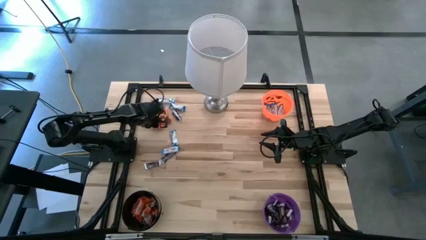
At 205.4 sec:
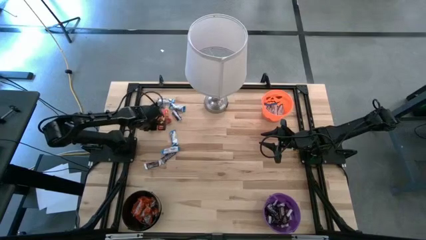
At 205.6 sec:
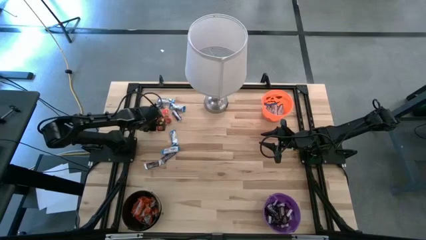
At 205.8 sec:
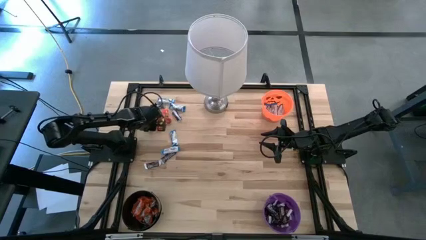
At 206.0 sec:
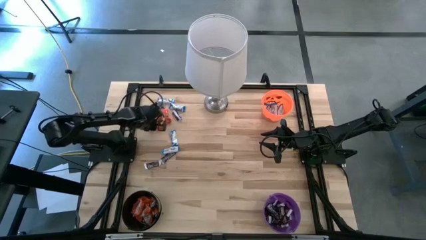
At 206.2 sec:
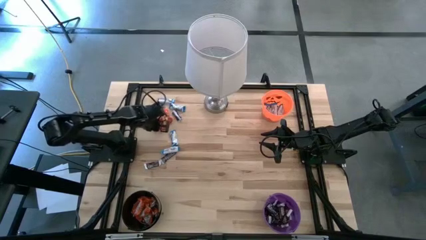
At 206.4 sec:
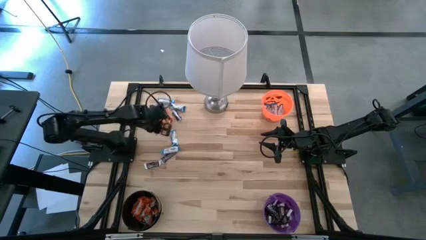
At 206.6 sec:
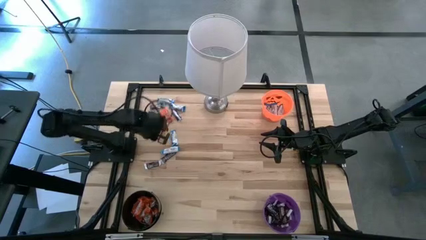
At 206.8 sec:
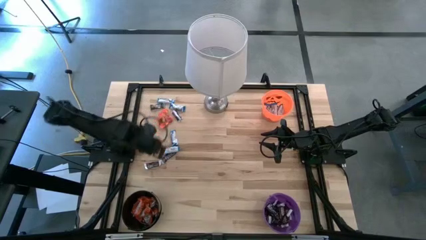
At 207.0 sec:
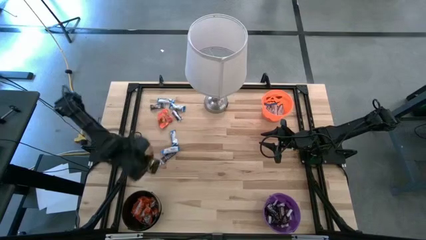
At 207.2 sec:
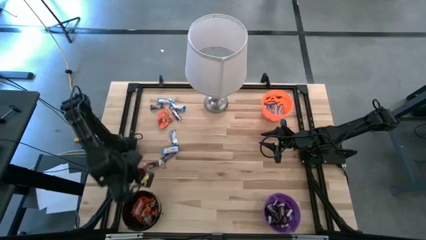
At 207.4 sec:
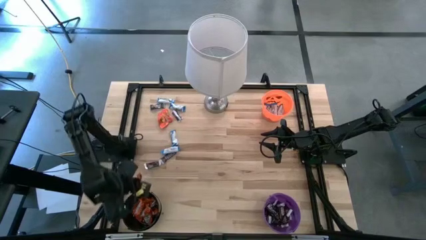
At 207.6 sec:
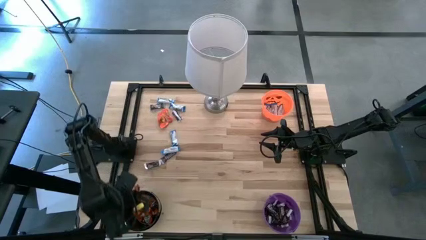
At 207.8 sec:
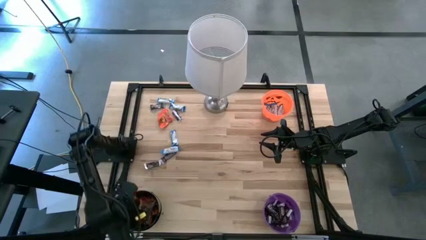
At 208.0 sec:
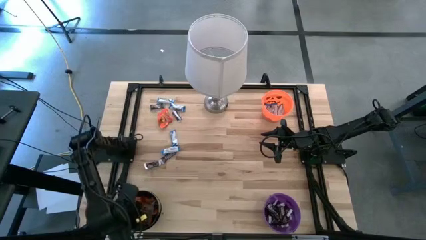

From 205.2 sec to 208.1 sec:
Task: Sort candy
Put the orange chocolate bar into the black bucket

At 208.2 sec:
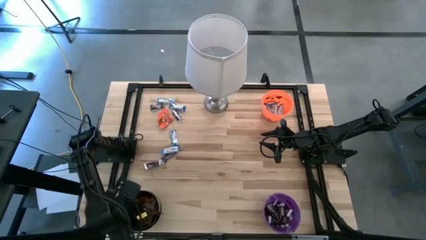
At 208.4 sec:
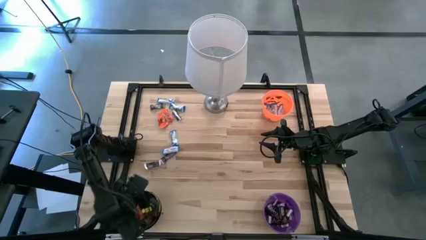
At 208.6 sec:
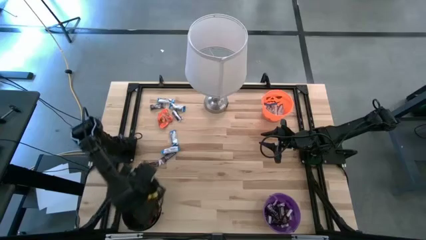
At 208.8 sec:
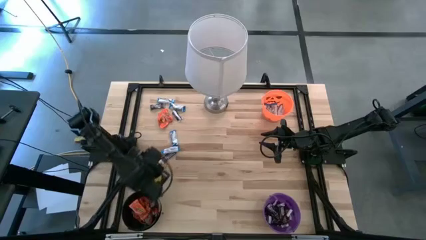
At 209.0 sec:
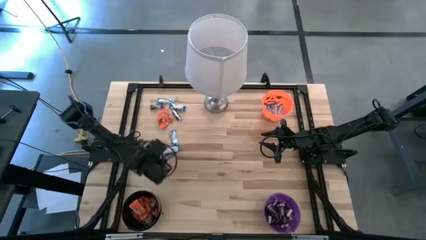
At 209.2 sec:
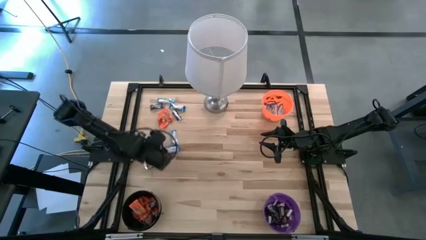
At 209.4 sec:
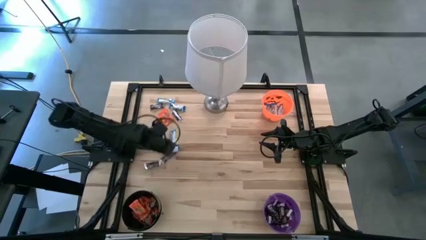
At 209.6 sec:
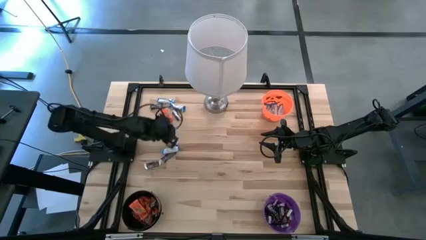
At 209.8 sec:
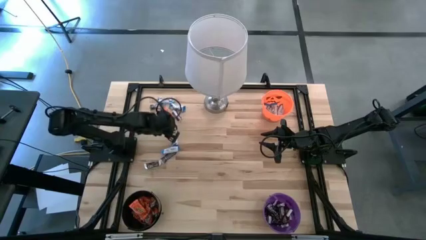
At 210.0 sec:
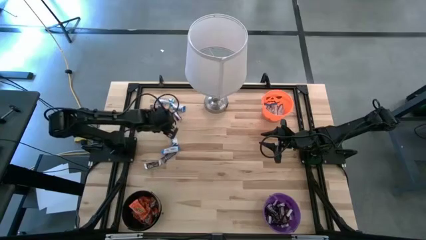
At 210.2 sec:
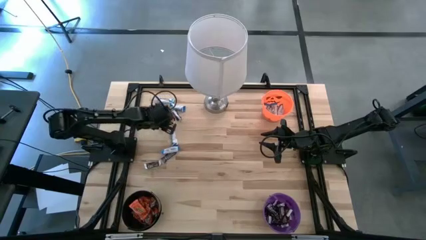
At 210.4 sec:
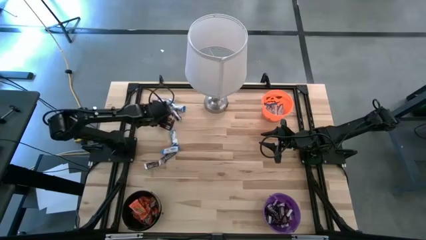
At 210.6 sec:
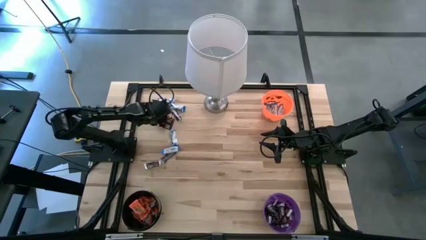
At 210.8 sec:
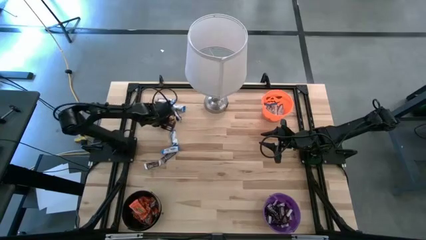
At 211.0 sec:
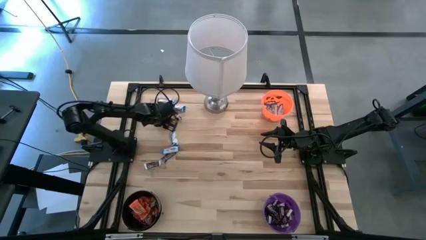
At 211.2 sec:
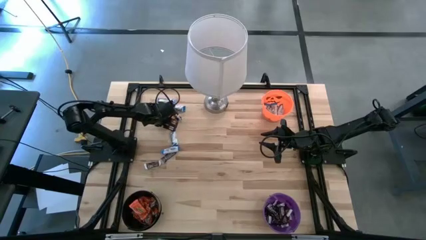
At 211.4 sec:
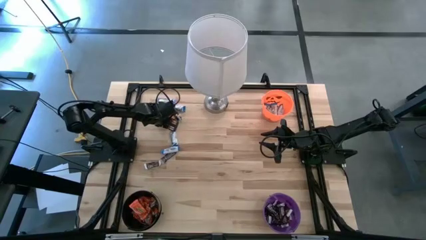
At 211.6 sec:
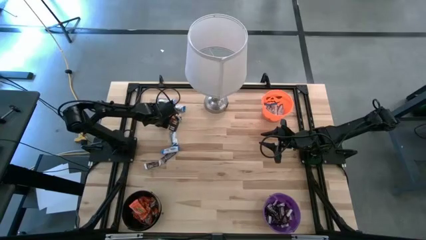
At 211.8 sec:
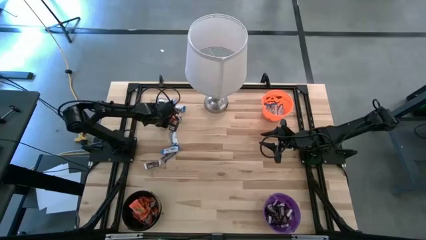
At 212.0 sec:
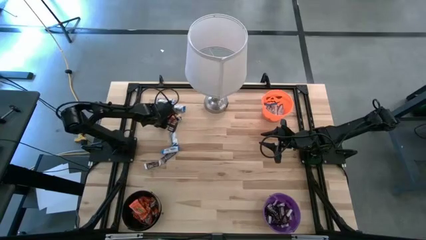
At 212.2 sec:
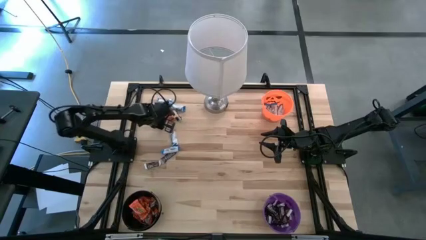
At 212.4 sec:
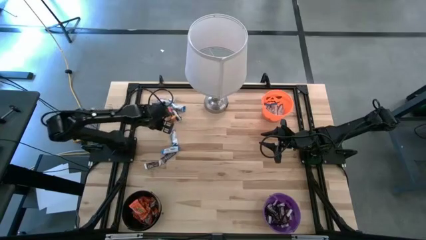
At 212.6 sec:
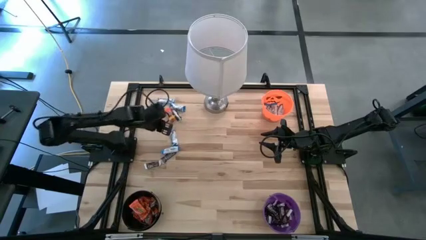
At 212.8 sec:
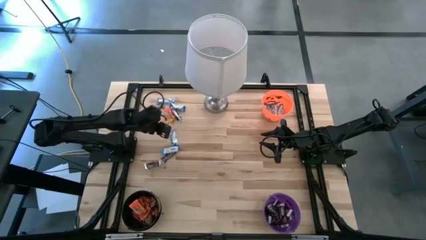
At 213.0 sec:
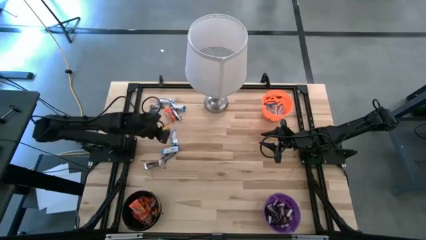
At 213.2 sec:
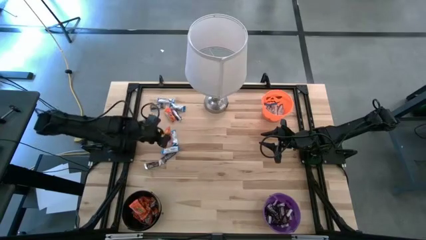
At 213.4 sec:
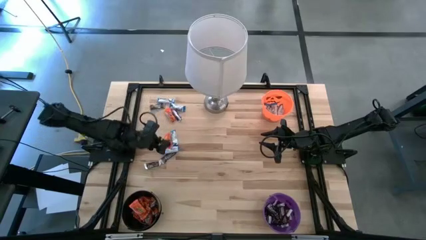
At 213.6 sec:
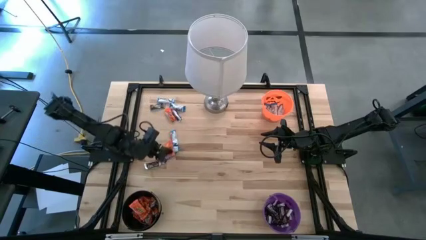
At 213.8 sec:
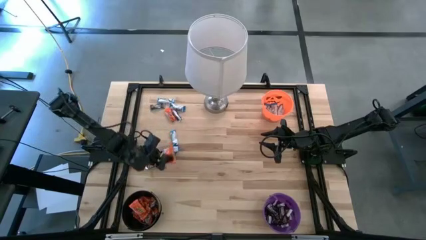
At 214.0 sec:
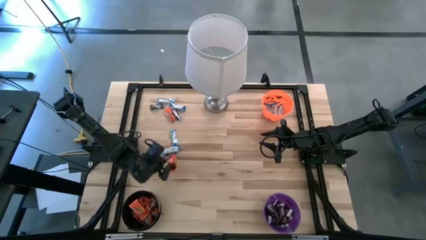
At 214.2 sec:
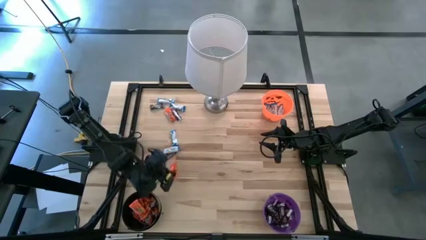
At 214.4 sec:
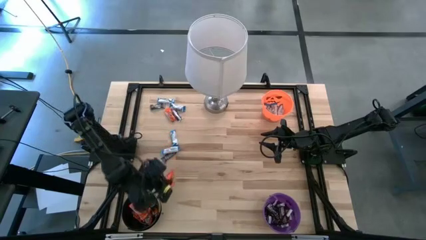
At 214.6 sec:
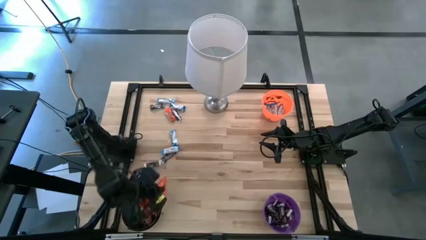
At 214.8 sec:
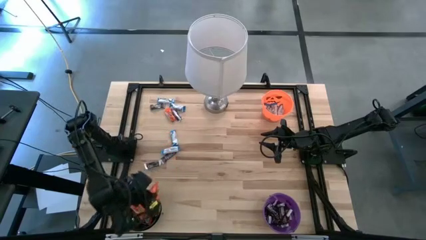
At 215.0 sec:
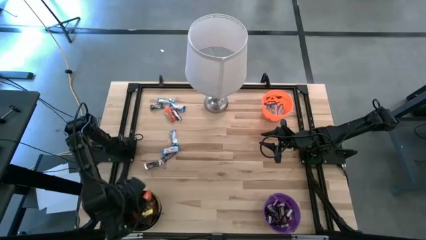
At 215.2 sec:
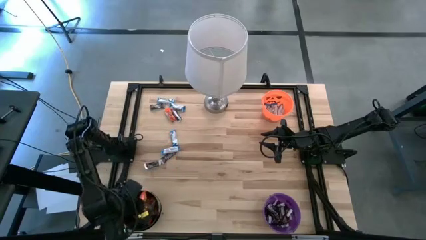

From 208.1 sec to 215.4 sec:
Put the orange chocolate bar into the black bucket

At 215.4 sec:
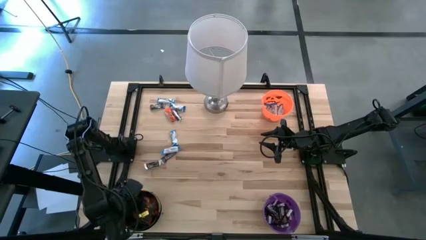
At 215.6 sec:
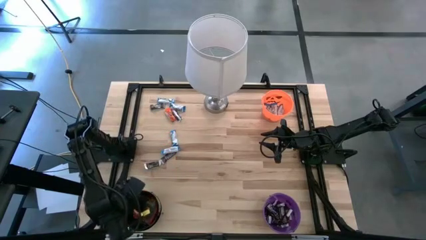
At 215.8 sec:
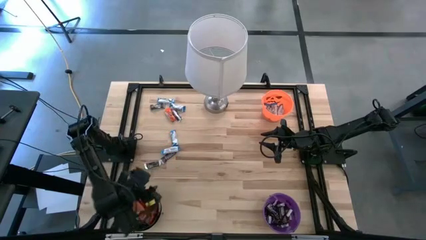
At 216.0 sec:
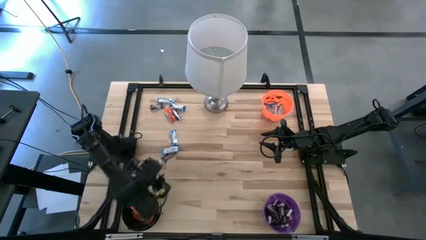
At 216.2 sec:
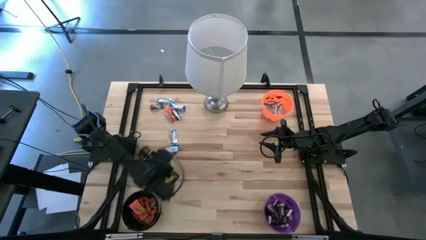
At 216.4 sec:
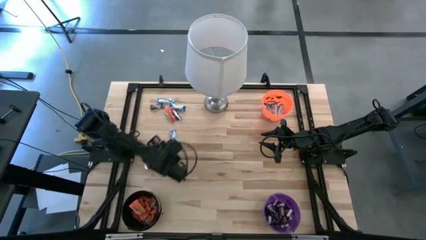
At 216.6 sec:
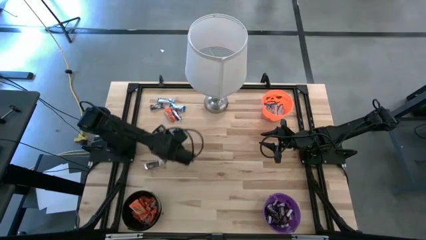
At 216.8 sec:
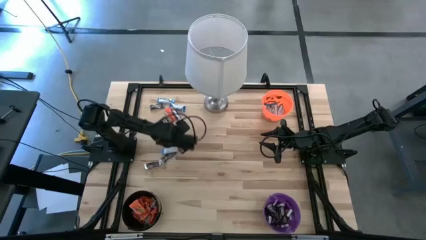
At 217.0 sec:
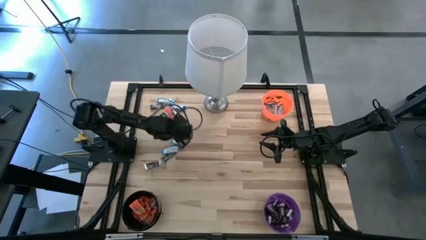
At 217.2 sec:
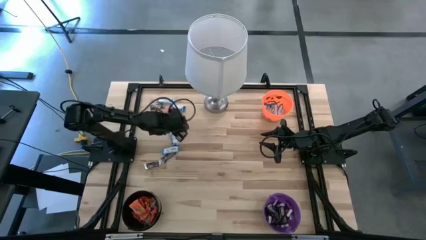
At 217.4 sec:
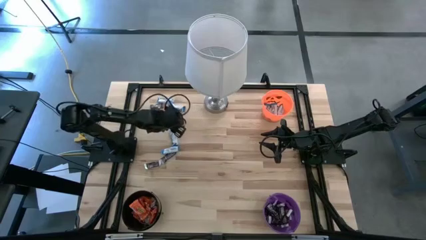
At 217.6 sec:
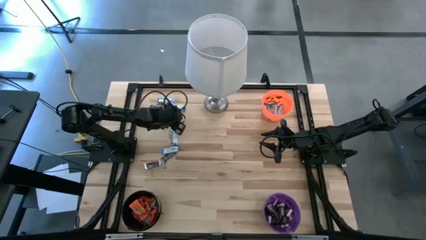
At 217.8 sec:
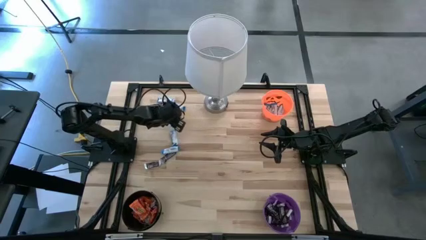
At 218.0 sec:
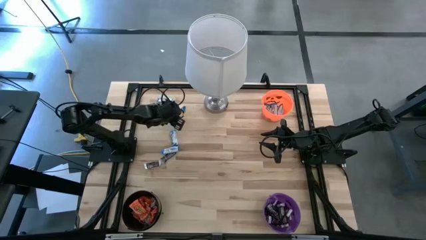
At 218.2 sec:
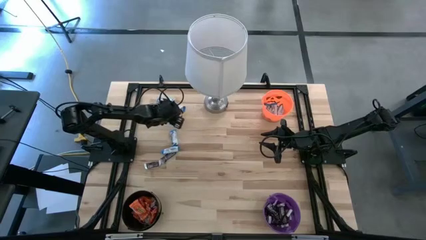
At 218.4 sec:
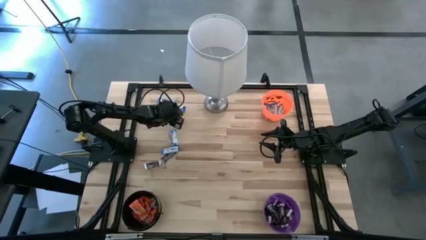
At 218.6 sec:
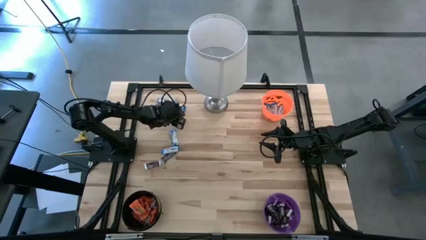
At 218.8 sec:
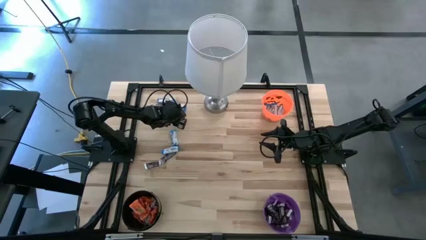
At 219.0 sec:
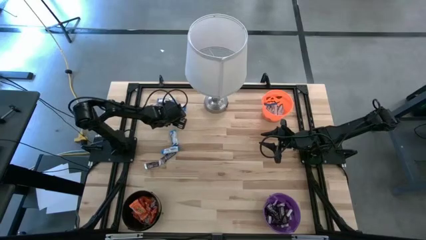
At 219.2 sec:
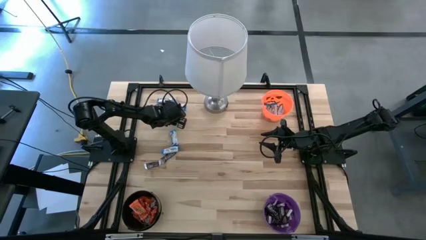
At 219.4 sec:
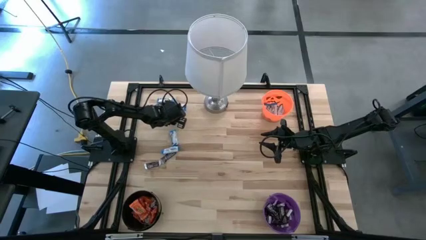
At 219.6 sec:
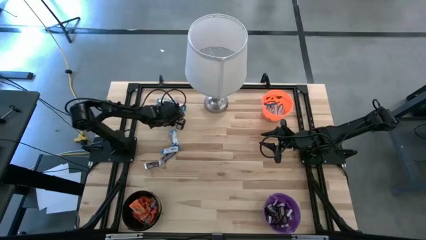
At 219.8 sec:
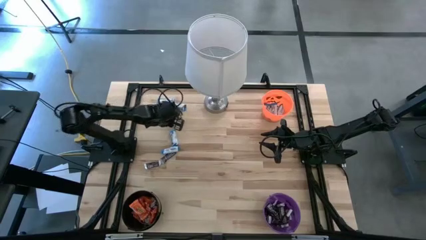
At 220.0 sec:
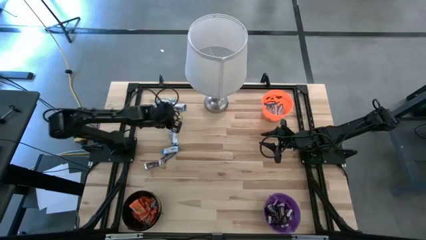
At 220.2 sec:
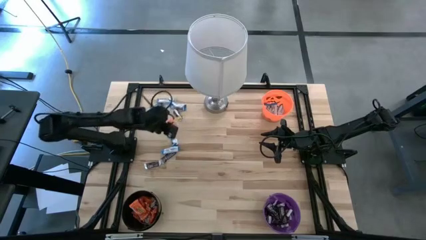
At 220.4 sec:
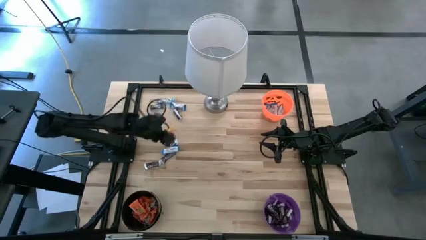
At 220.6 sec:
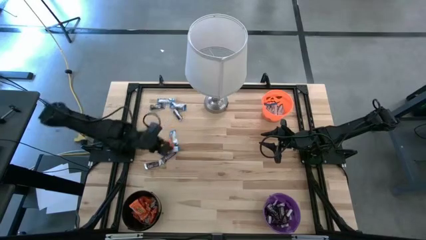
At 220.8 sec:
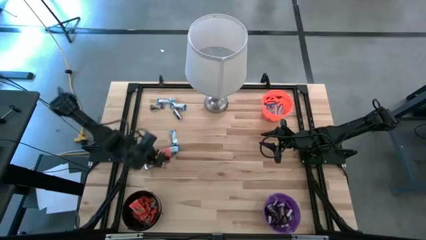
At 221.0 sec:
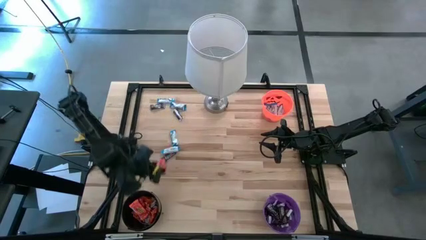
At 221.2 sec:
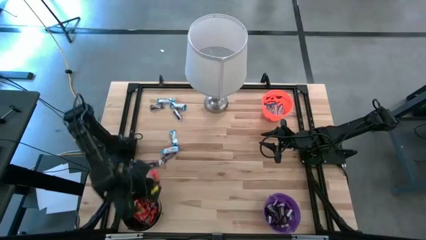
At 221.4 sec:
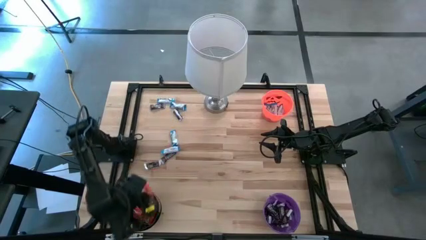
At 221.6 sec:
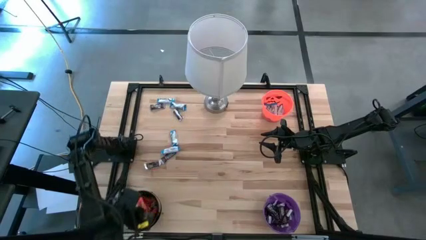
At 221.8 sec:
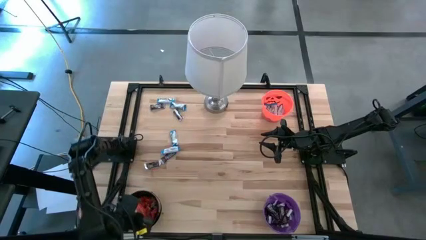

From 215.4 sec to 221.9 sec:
Put the orange chocolate bar into the black bucket
